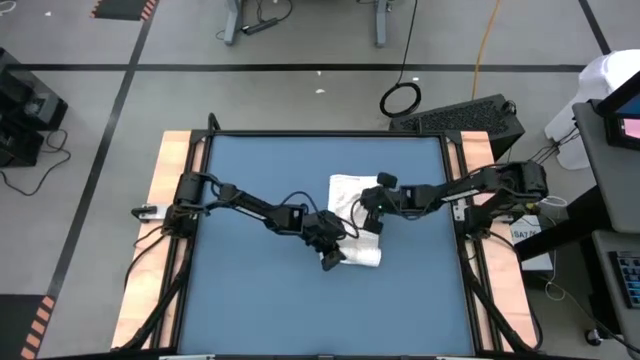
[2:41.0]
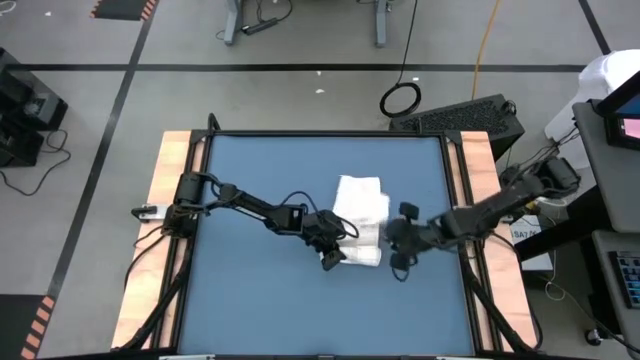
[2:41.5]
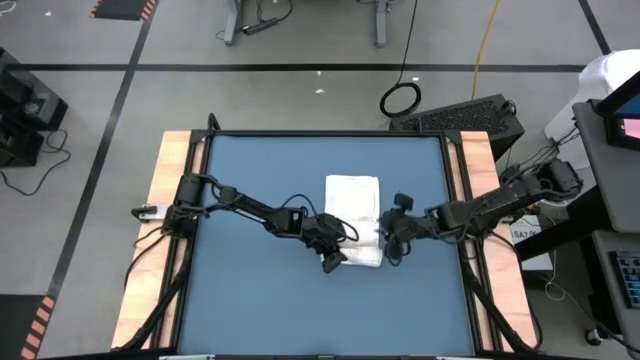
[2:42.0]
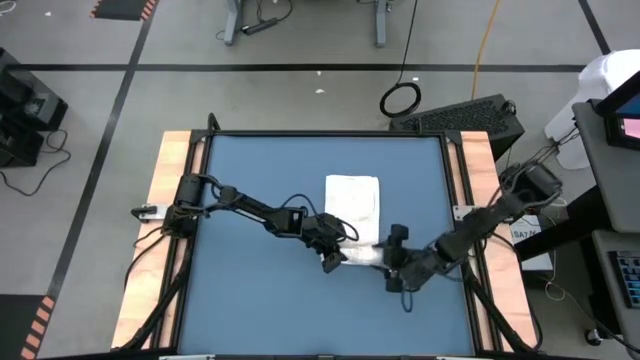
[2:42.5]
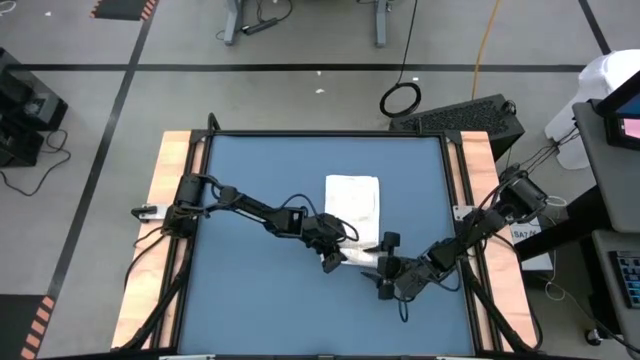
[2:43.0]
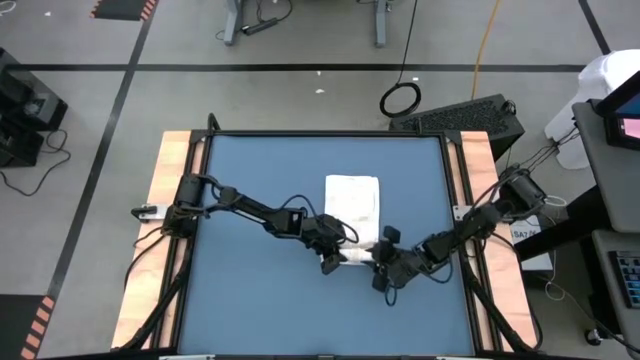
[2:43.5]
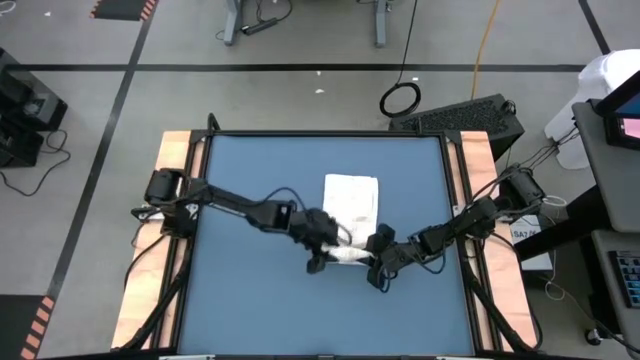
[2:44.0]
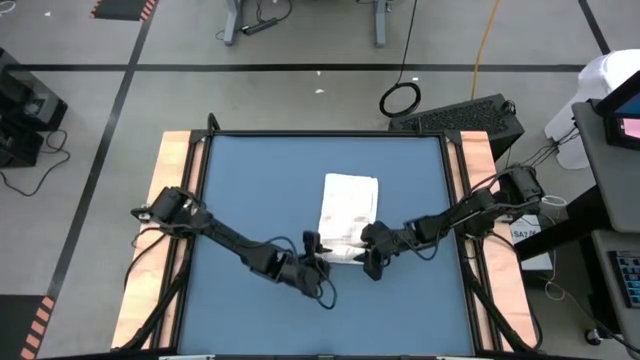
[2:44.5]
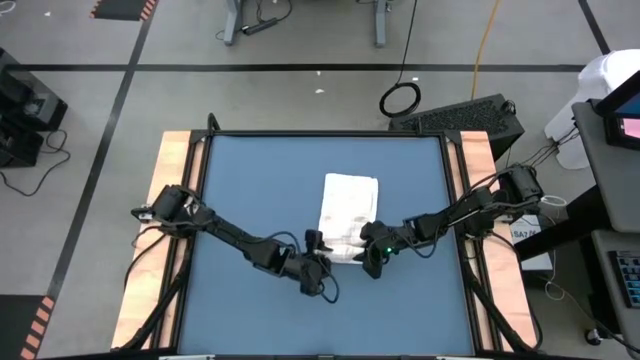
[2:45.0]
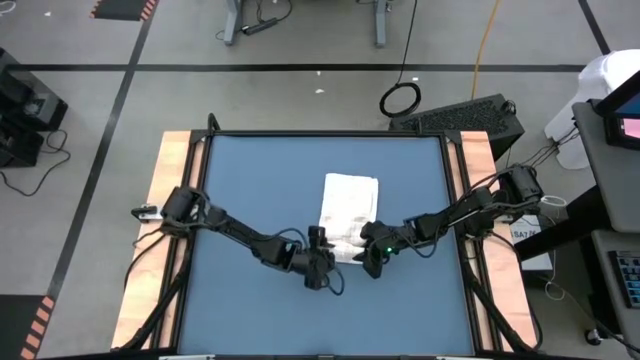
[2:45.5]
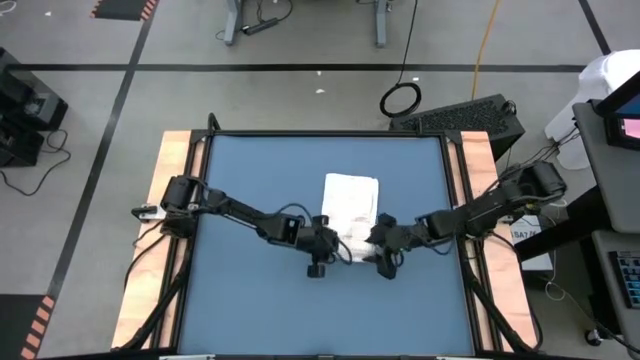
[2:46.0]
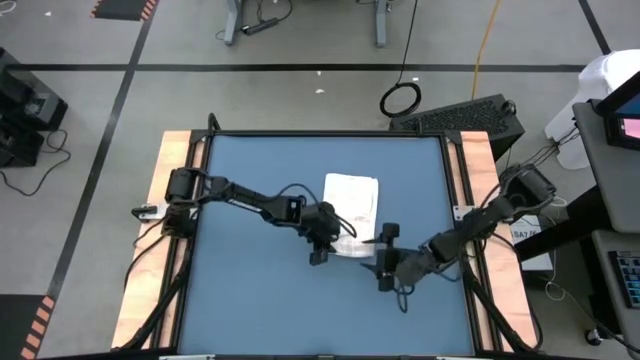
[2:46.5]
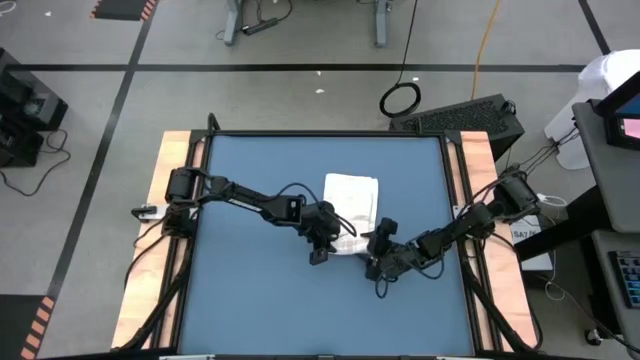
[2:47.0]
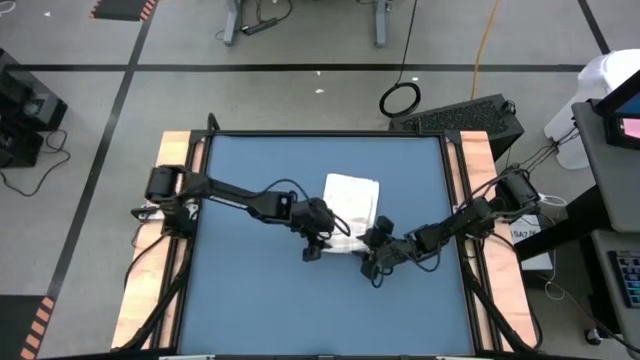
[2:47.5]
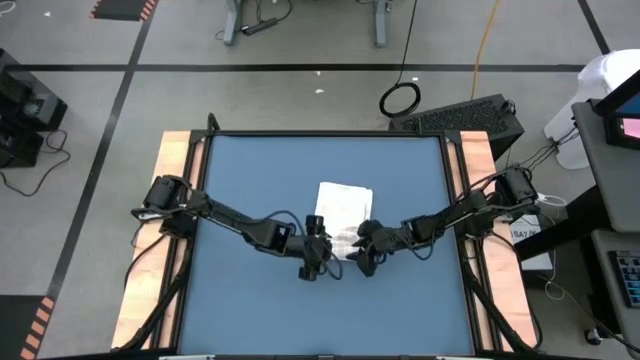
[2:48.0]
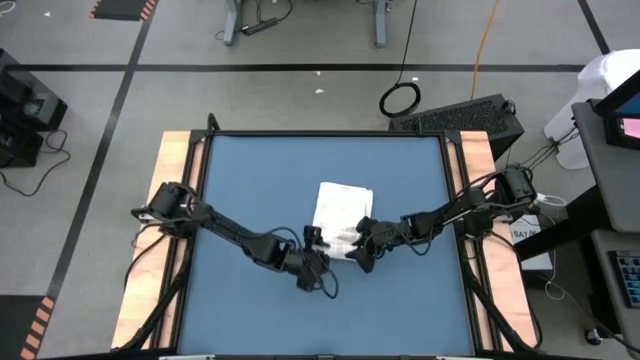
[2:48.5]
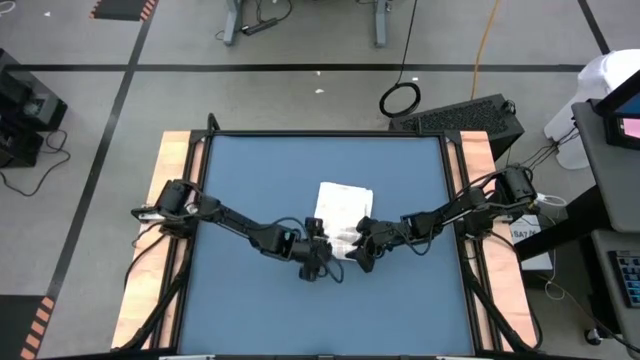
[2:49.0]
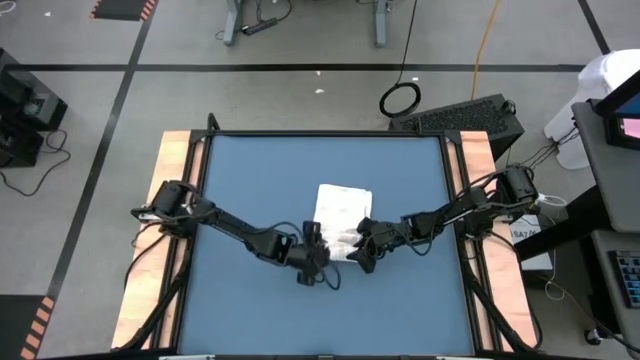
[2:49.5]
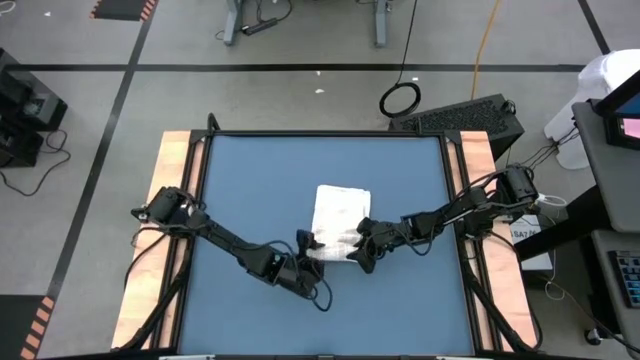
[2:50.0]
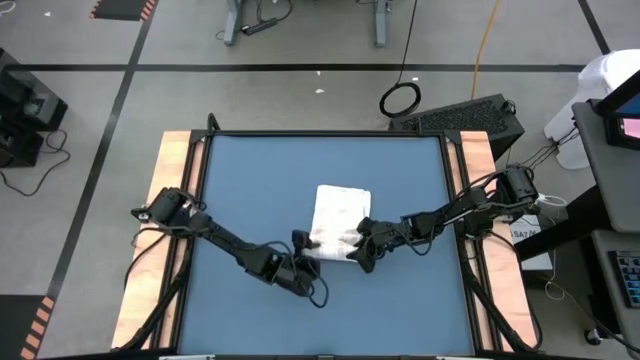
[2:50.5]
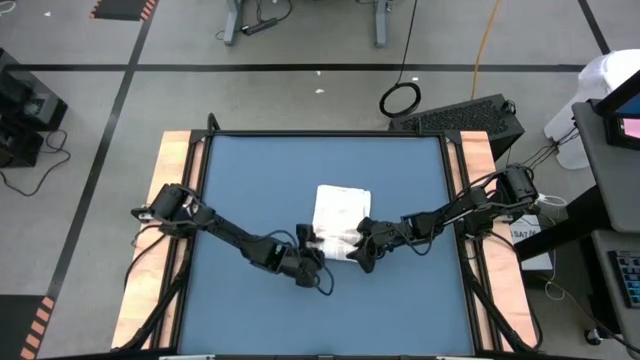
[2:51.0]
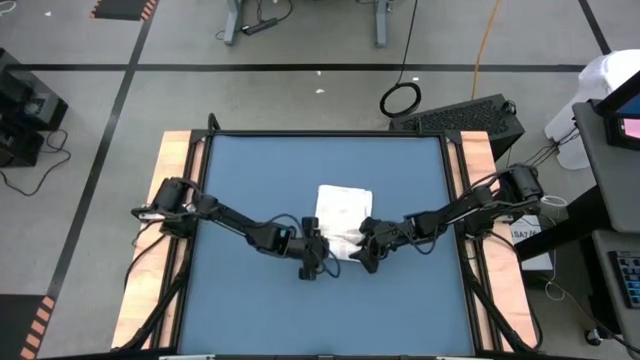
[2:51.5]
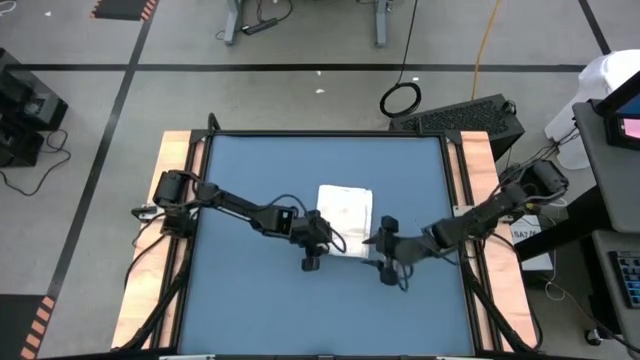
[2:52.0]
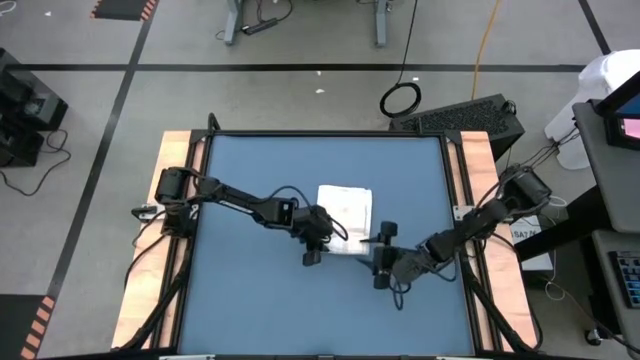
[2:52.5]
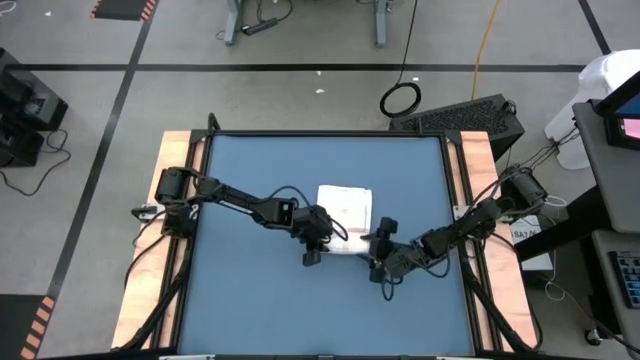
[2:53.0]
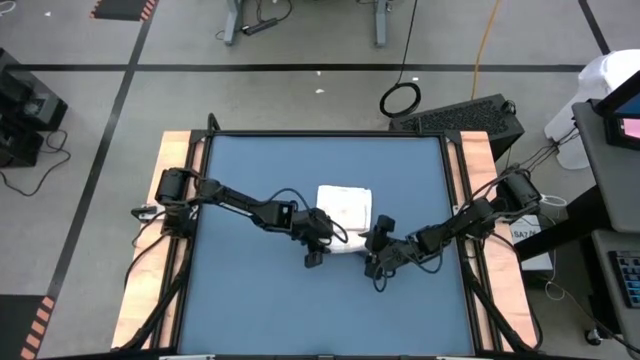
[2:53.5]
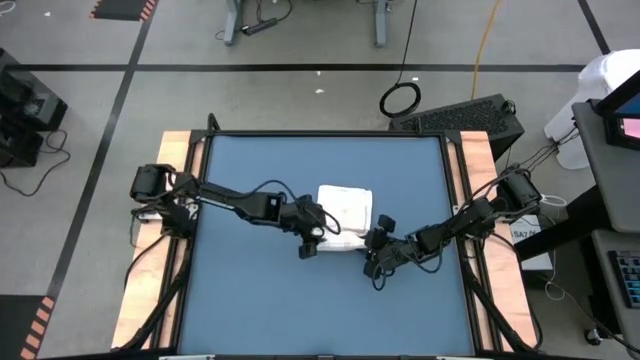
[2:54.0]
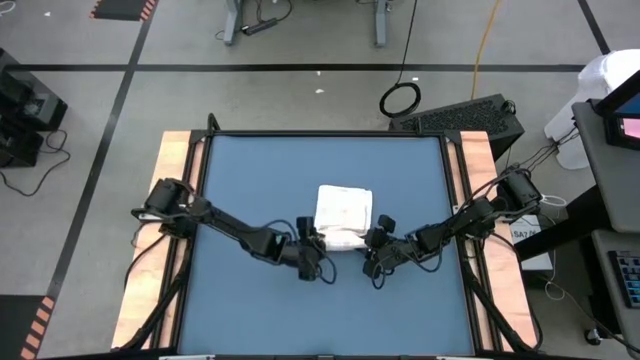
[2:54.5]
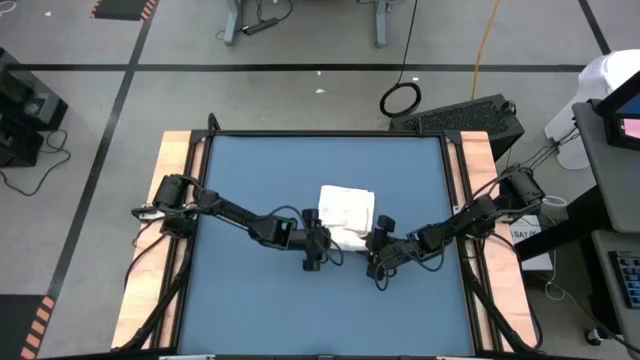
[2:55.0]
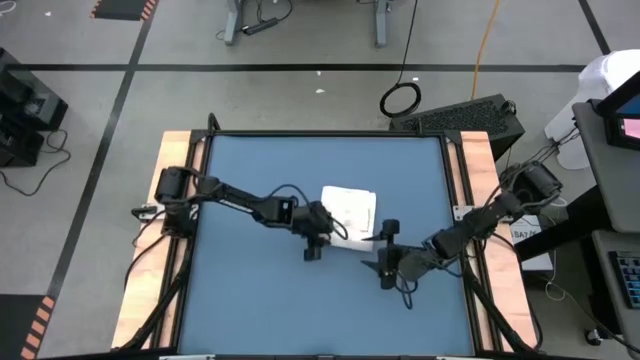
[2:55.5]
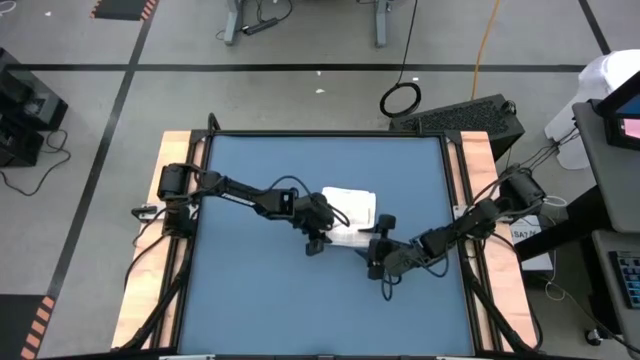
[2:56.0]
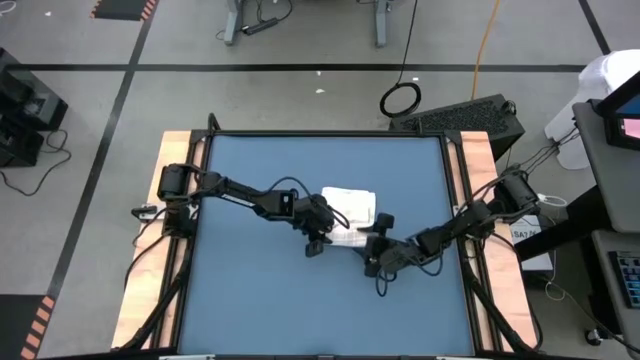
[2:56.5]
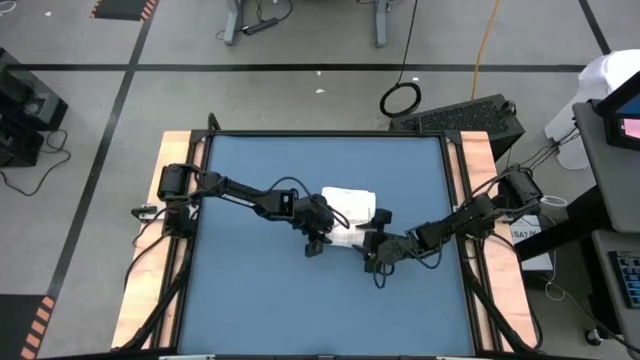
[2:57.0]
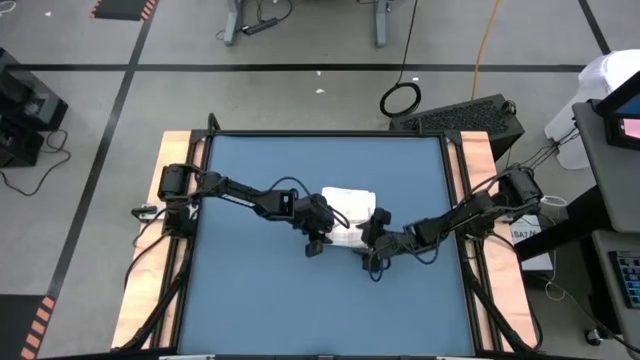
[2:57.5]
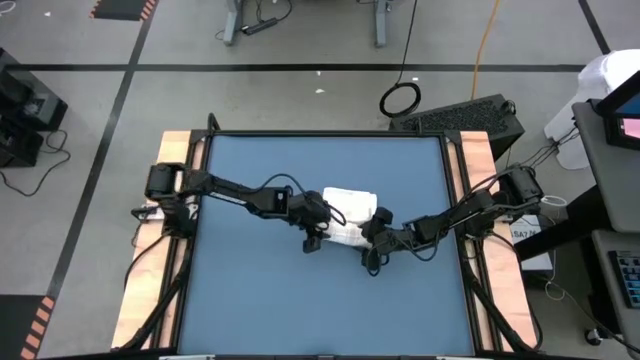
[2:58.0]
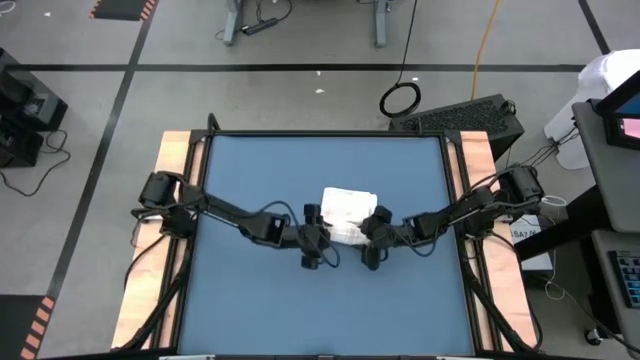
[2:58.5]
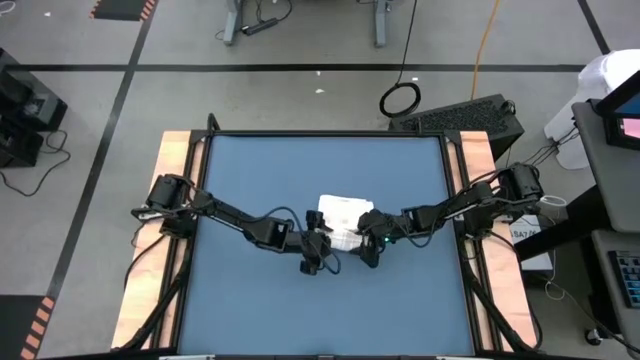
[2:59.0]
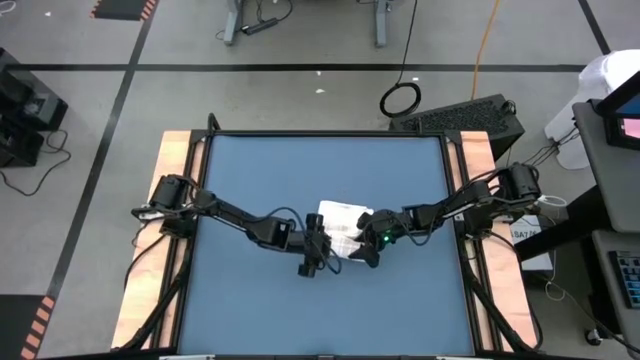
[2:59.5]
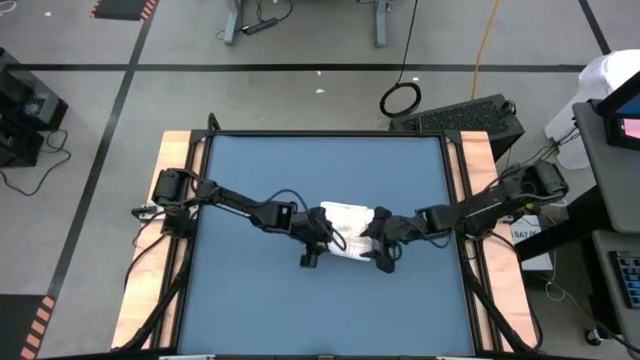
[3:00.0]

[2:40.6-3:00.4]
Task: Roll towel
Roll the white towel

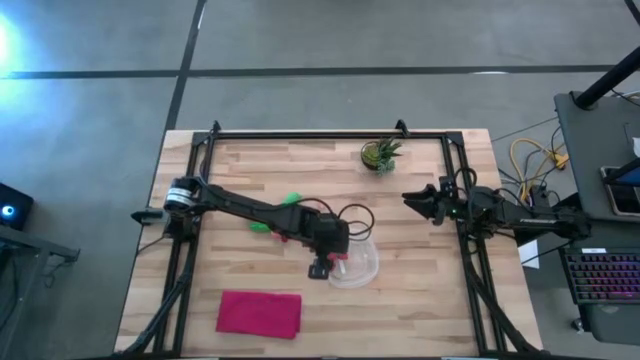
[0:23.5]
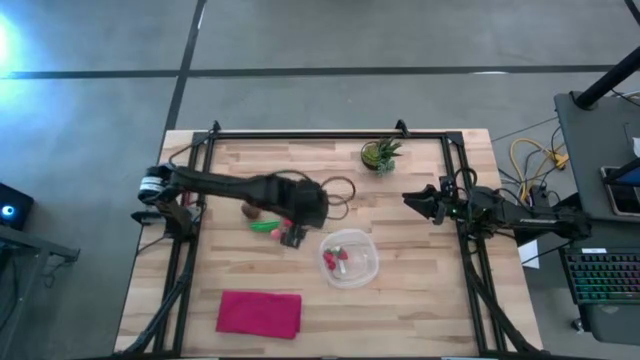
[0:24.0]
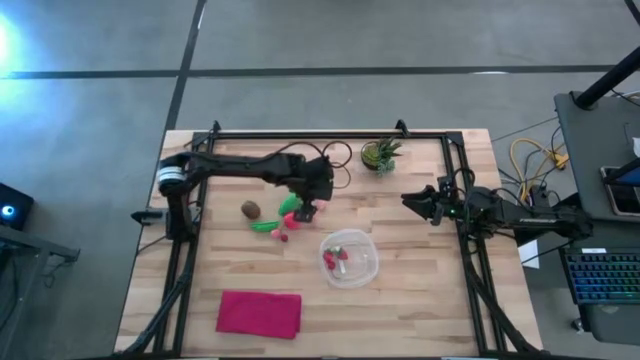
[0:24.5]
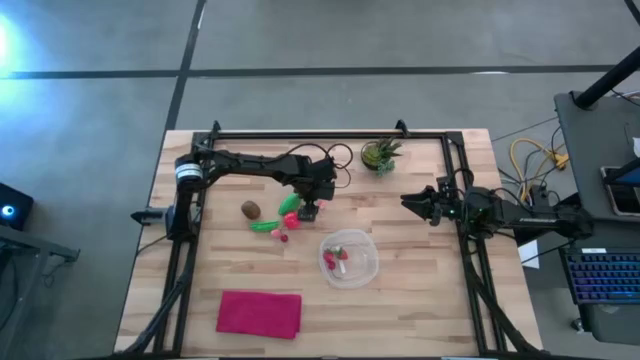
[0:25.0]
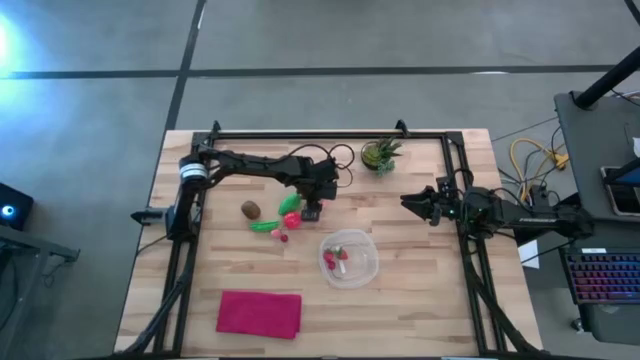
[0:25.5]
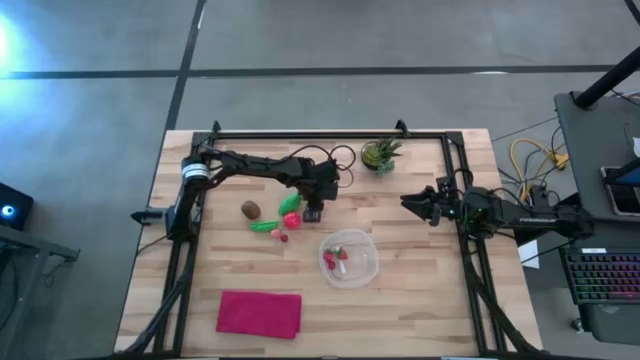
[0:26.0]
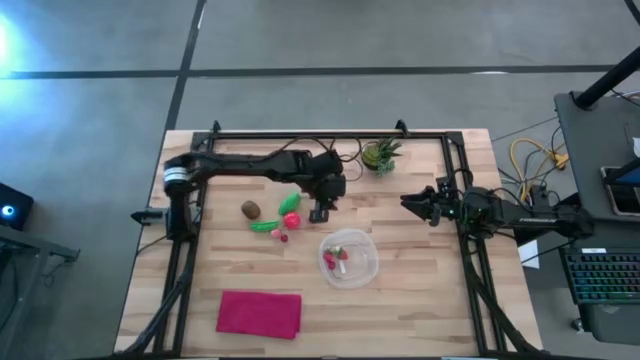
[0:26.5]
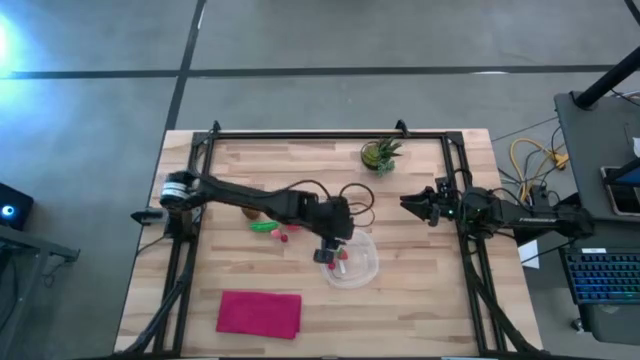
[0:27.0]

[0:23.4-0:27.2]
Task: Pick and placing Produce into tupperware
Put the top peach into the container
